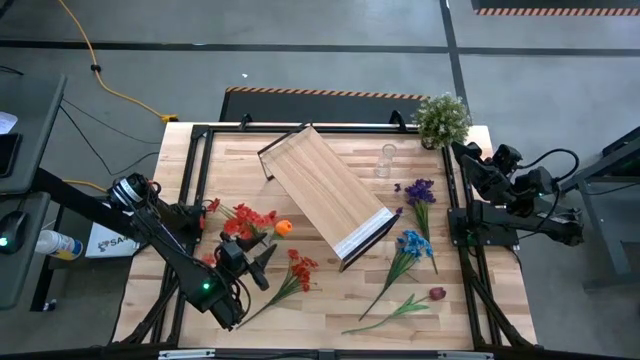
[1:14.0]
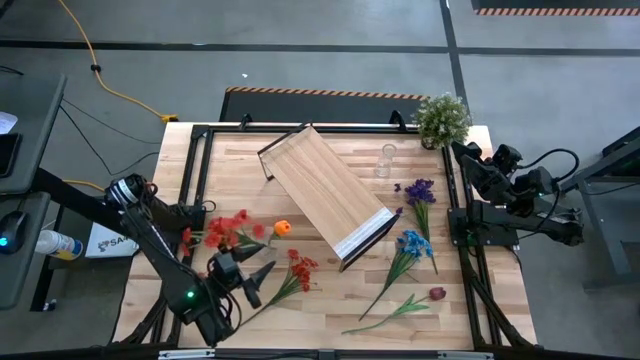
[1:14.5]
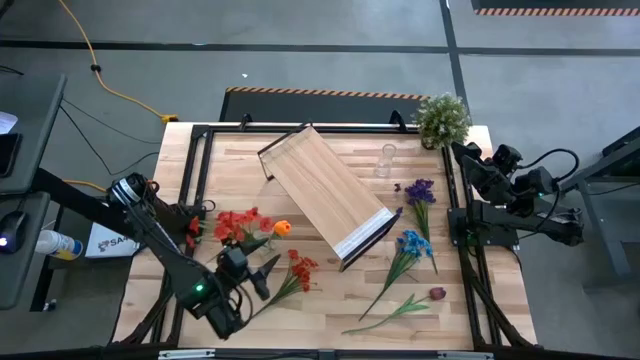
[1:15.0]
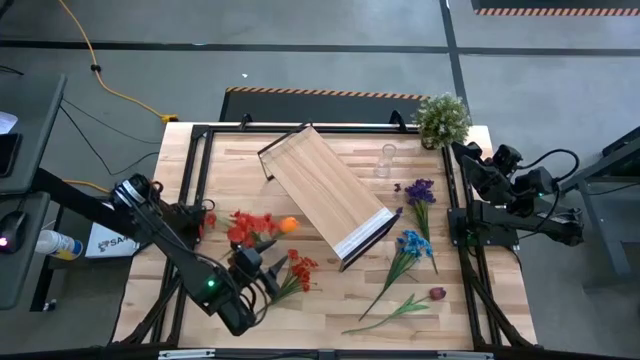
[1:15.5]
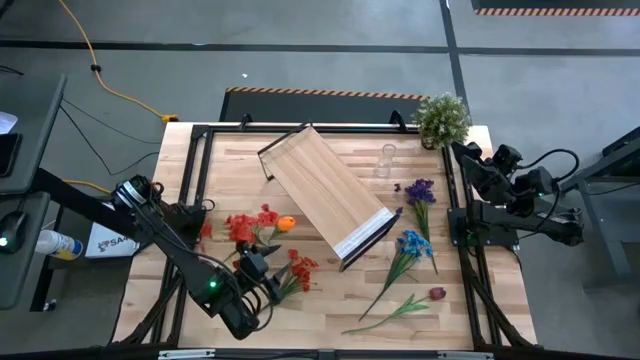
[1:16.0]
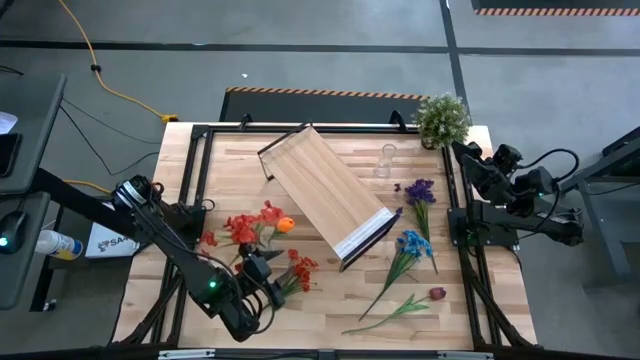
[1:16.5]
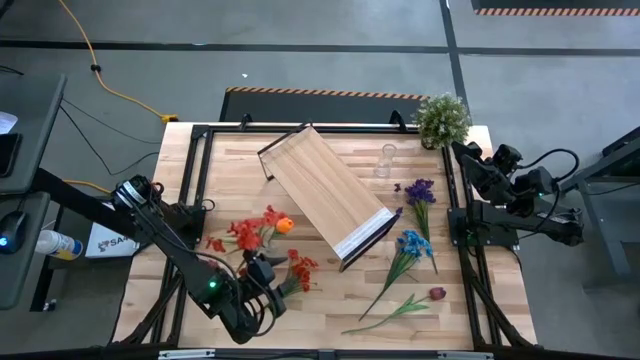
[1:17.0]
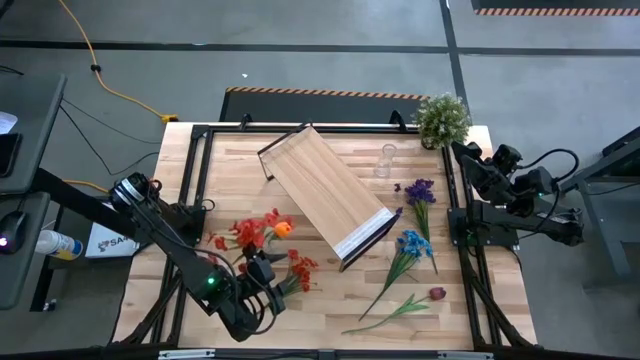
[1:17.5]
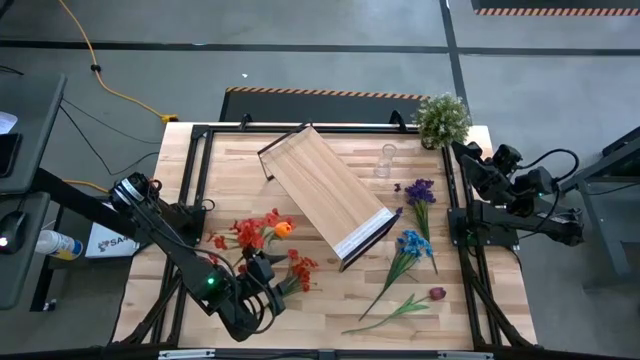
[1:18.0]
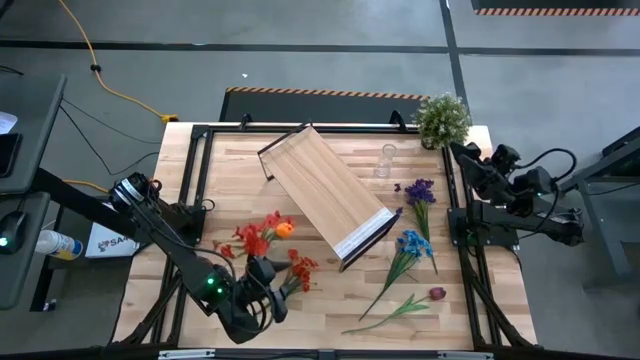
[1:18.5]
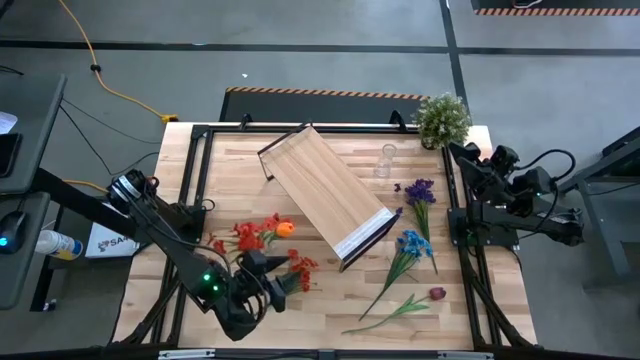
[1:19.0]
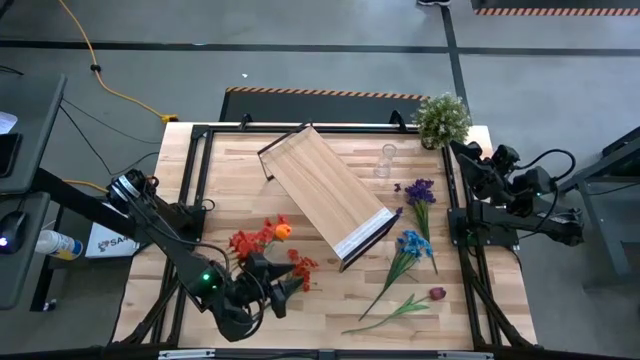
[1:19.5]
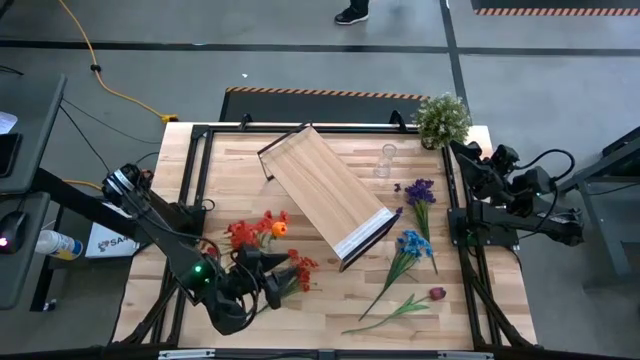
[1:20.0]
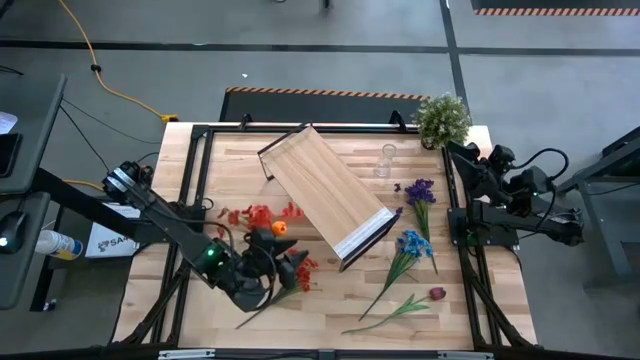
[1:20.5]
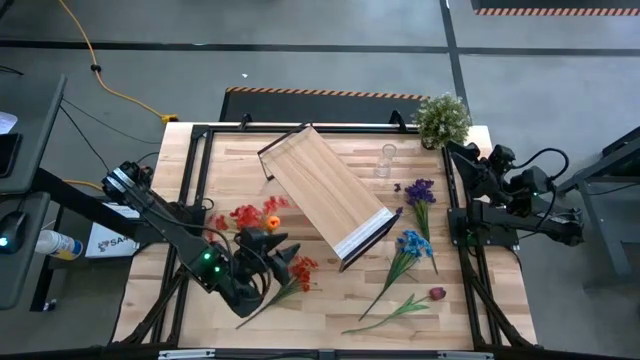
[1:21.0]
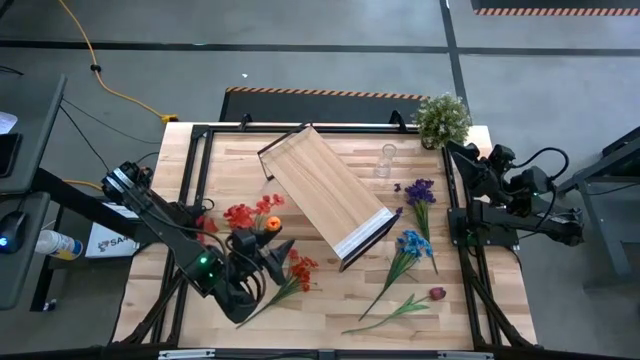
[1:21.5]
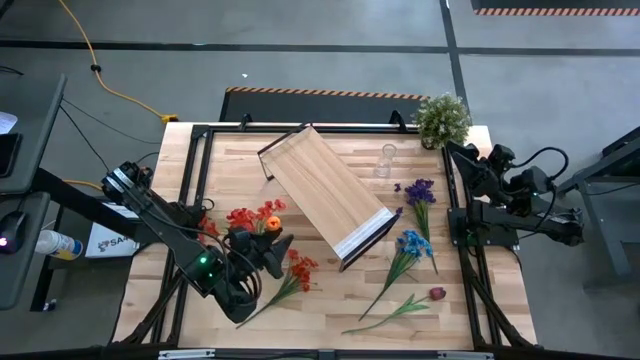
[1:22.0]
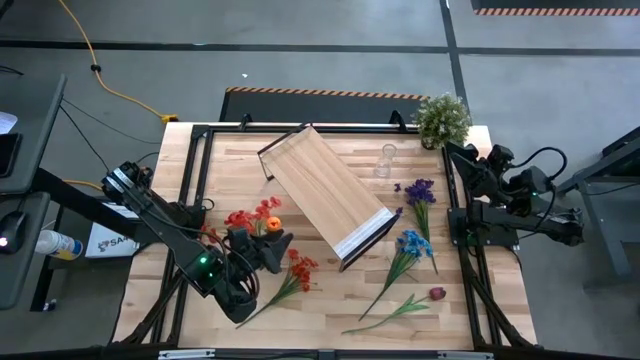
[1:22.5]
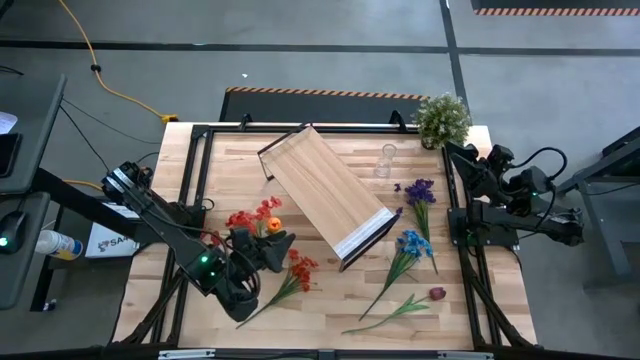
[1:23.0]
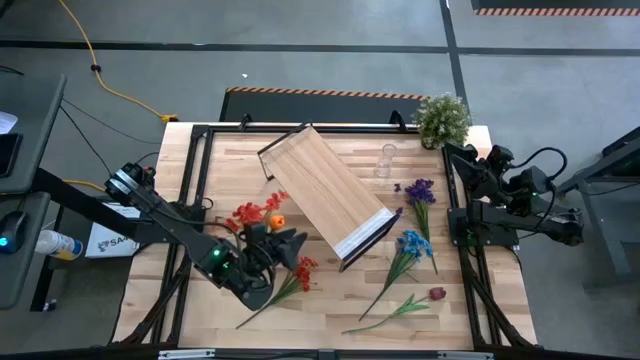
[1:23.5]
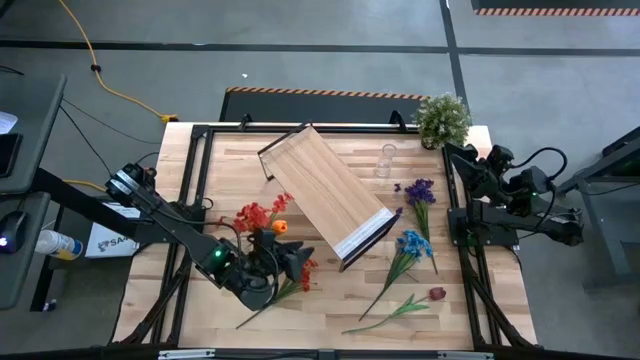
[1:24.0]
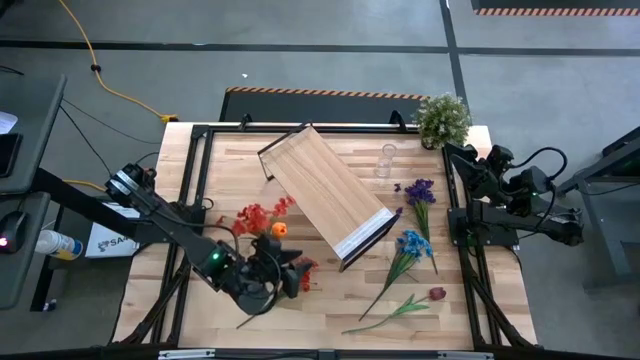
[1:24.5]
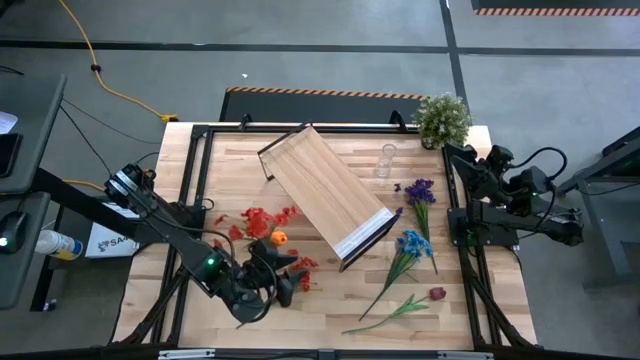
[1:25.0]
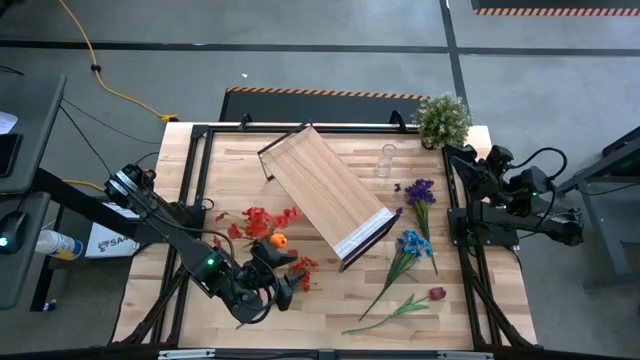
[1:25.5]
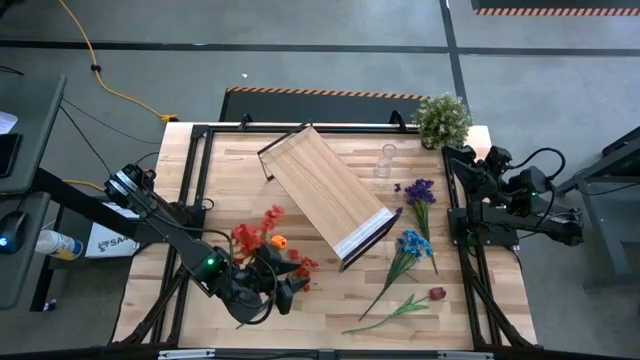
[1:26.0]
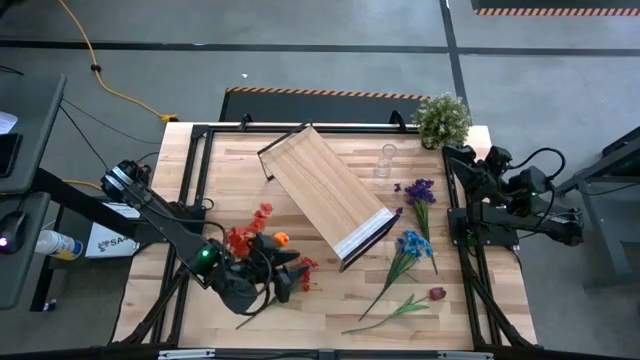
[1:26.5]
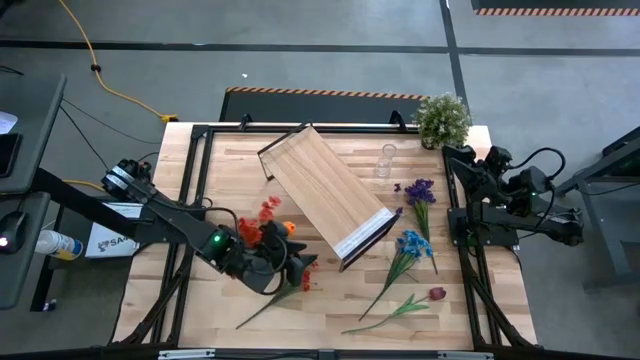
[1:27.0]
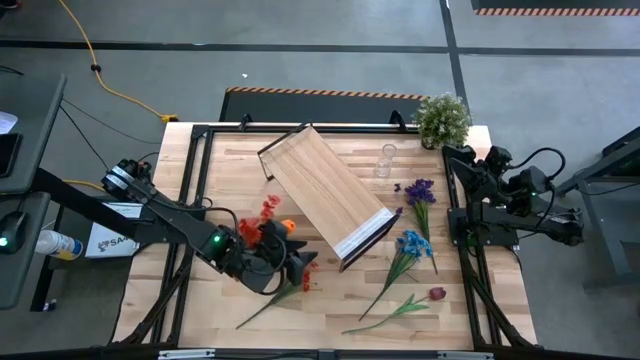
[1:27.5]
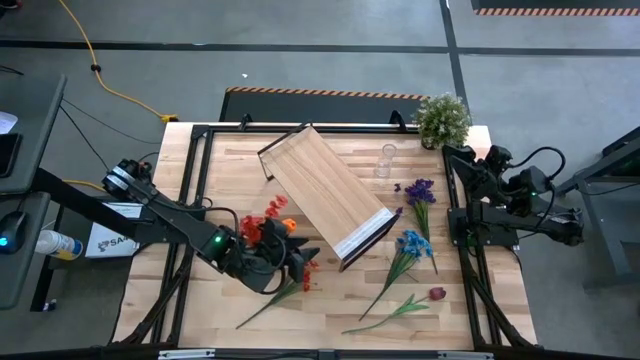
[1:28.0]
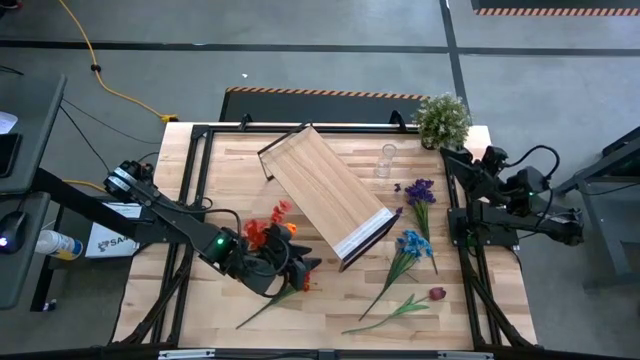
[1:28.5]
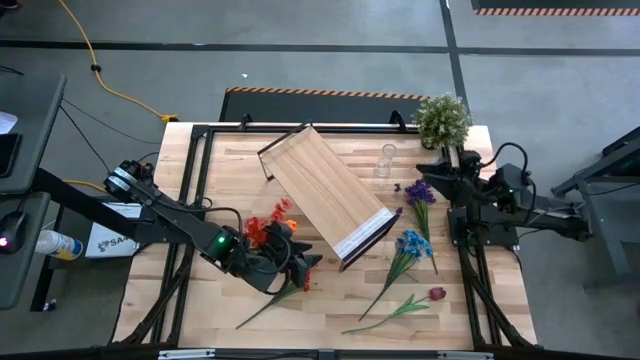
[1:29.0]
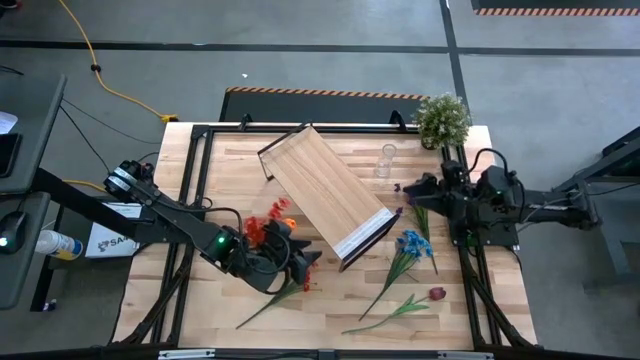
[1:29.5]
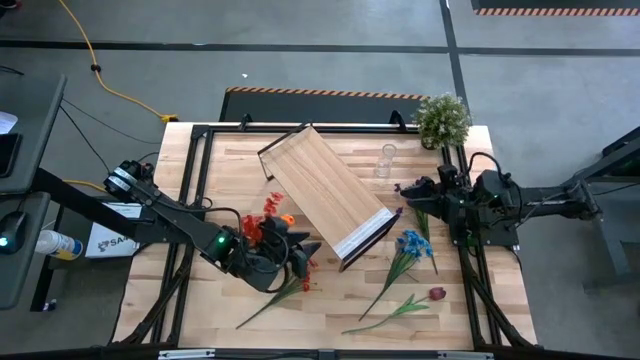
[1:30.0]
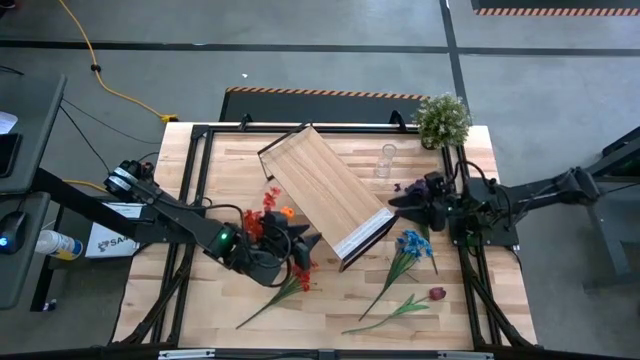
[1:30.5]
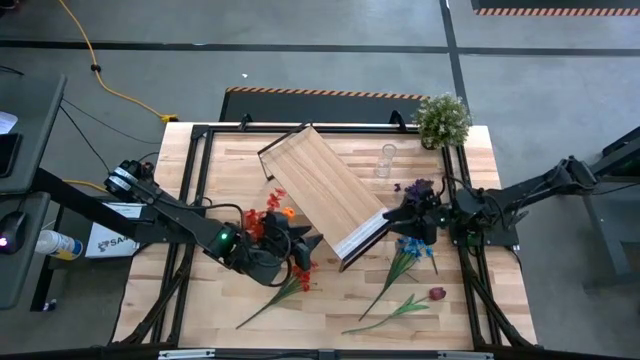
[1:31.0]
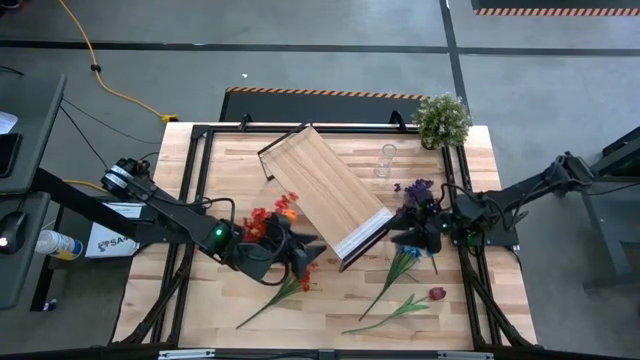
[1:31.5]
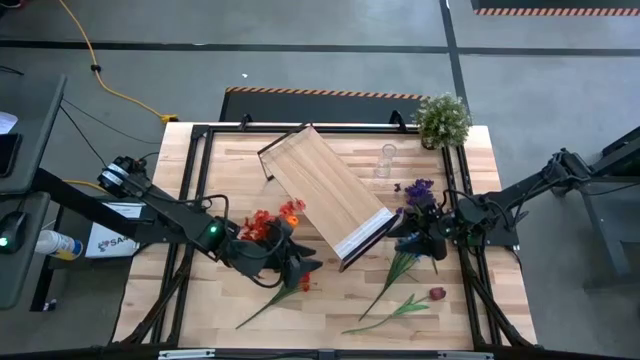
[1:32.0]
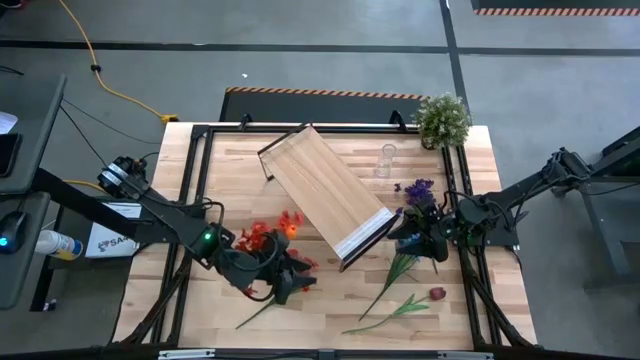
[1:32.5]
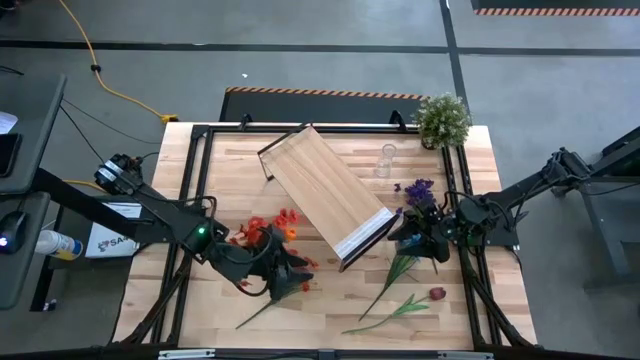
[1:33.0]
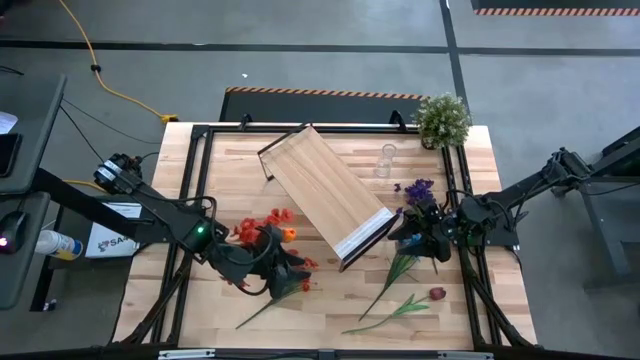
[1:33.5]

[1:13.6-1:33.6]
Task: Pick and place flowers into a vace then onto a shelf
Put the red flowers into the bottom transparent vase

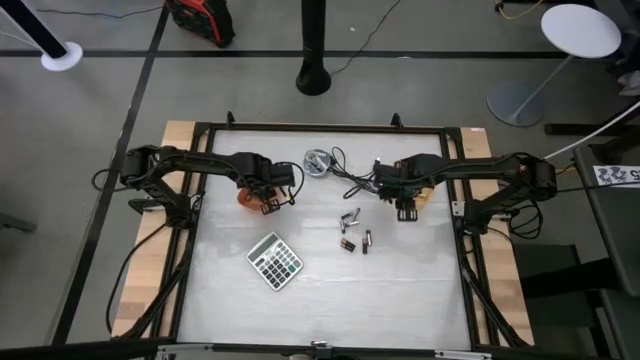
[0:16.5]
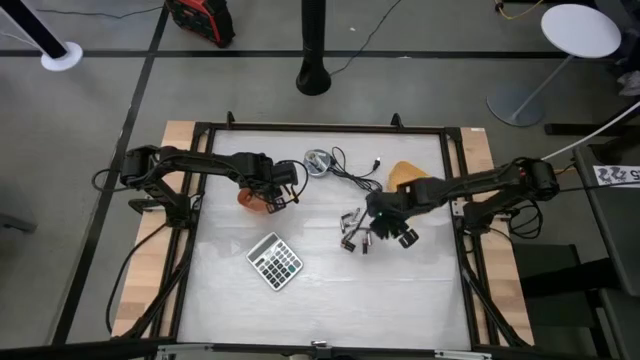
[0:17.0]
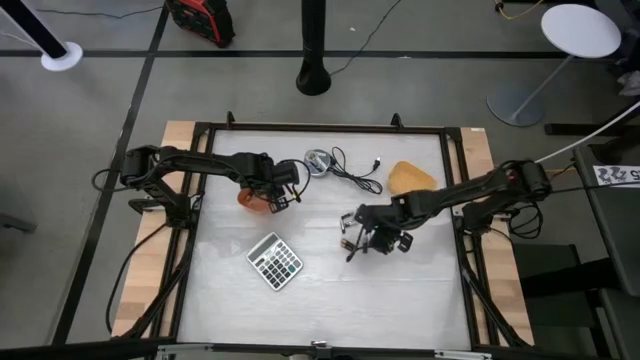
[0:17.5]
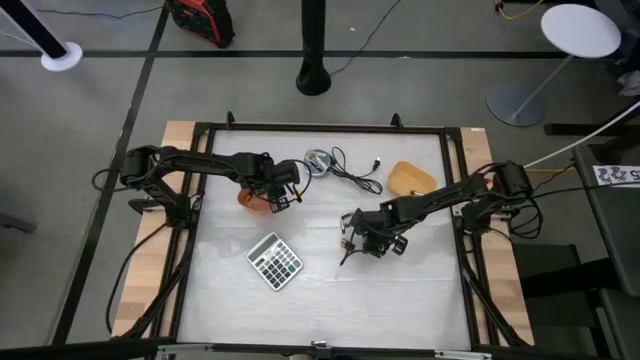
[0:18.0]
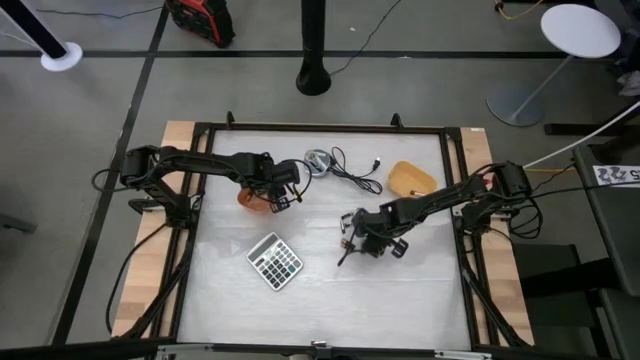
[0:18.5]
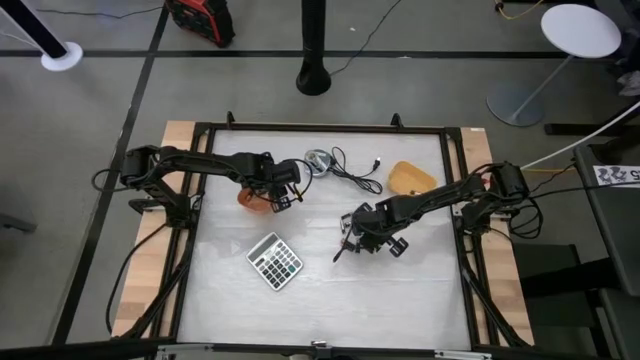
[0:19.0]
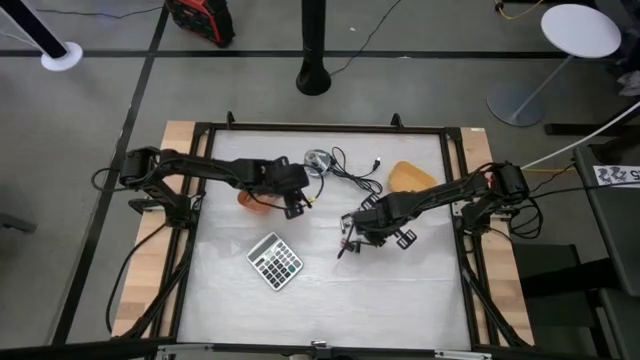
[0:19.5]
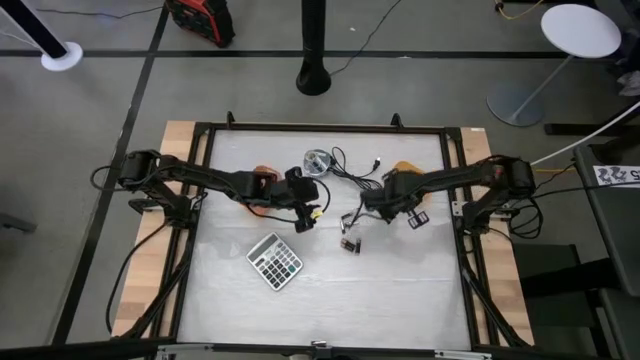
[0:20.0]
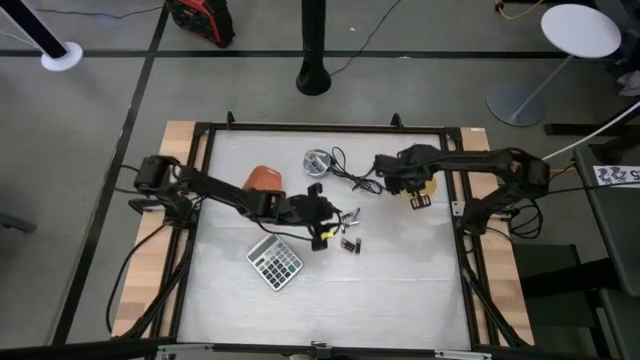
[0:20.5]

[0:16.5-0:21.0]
Task: Sort batteries
Put the silver battery into the yellow bin
